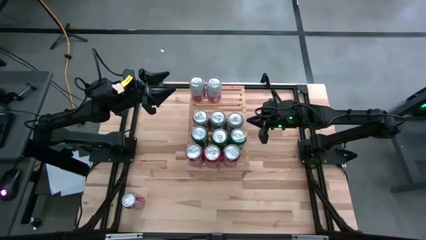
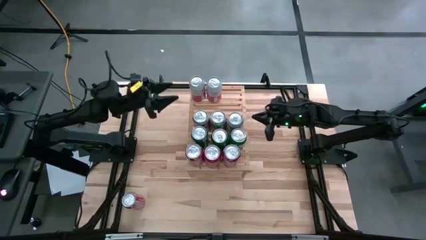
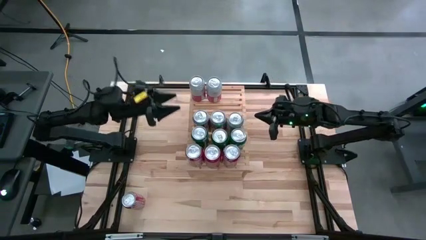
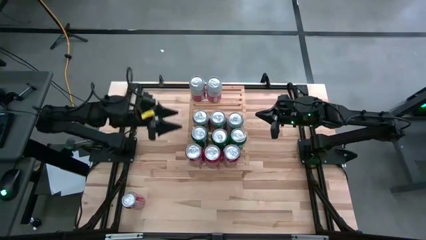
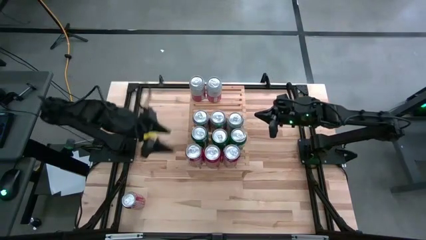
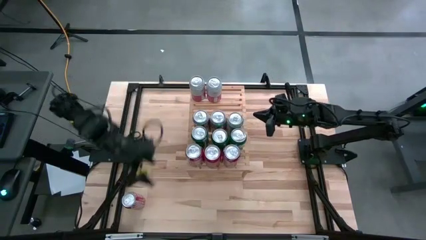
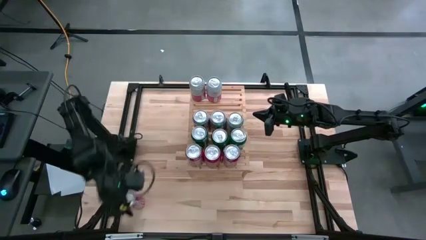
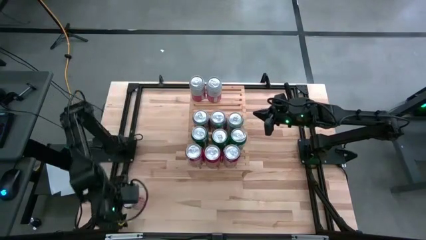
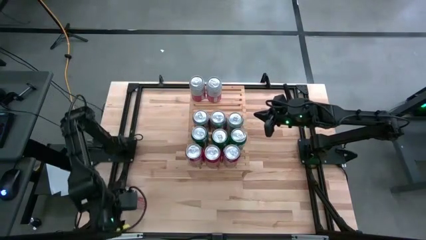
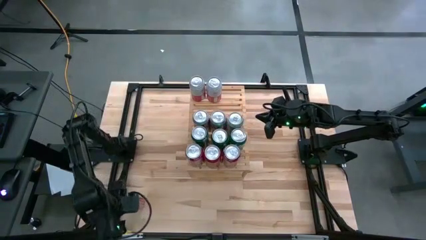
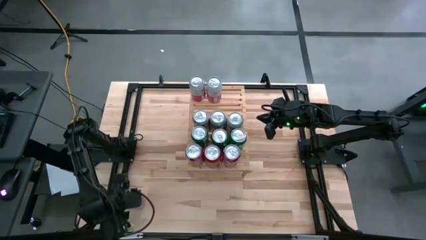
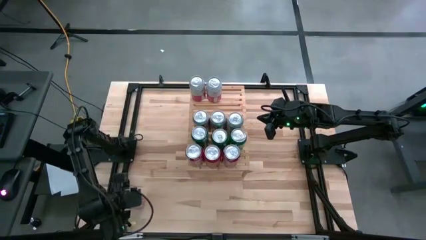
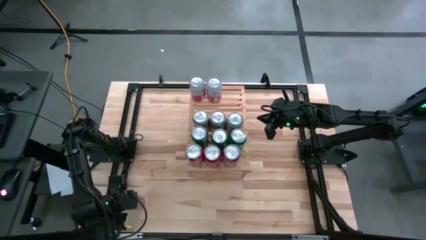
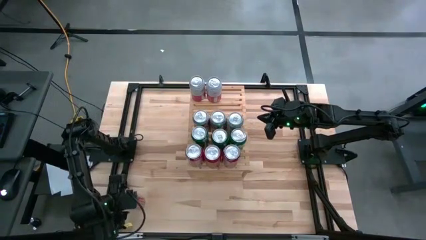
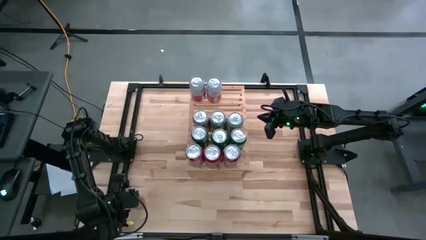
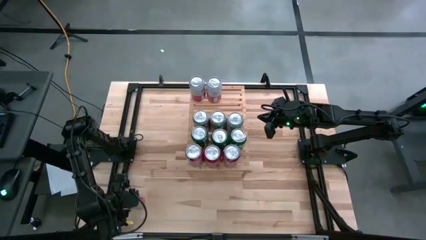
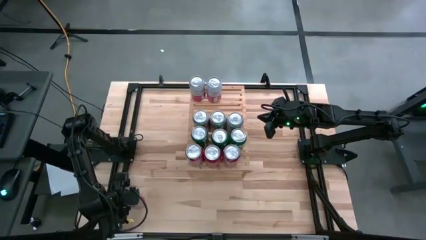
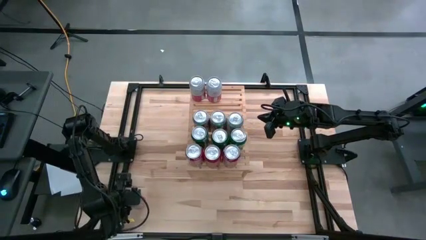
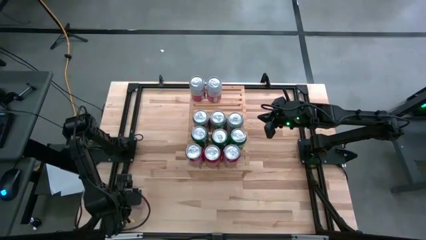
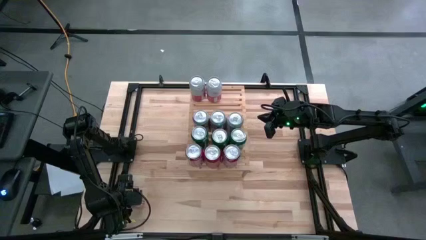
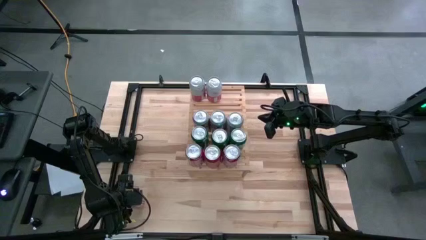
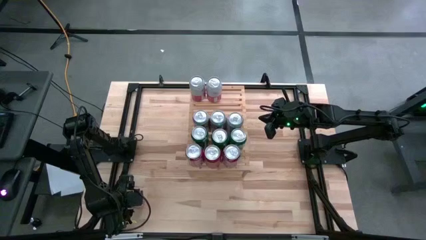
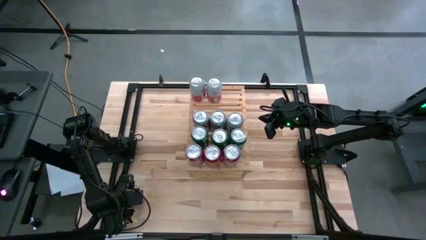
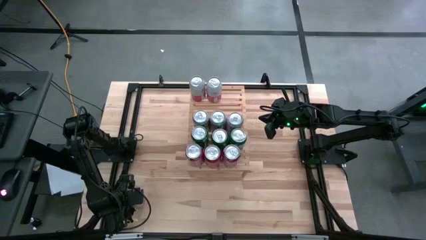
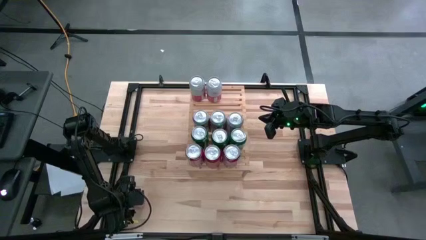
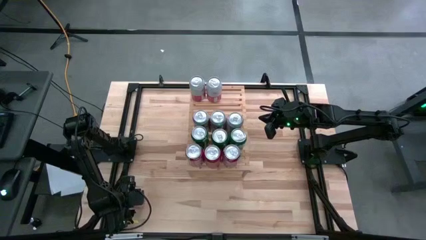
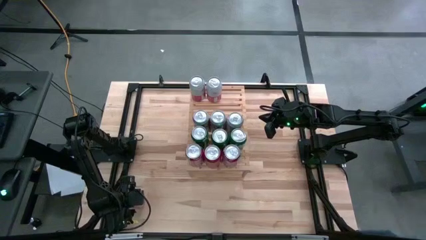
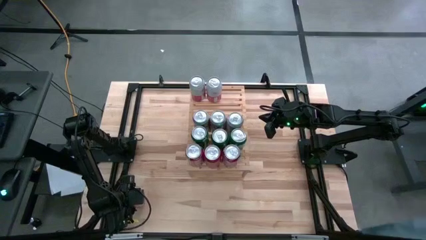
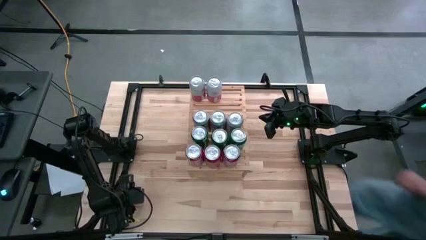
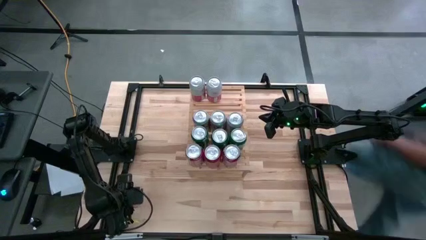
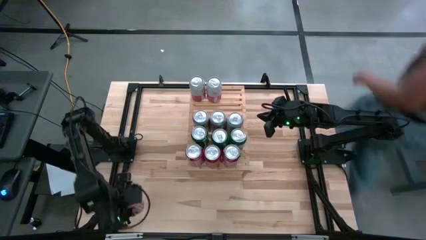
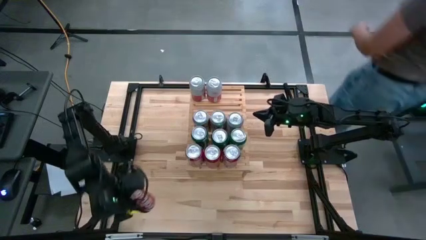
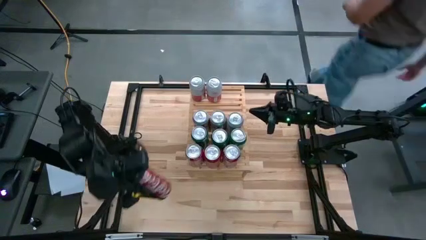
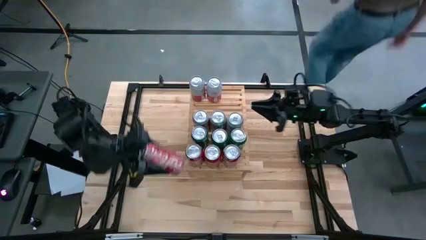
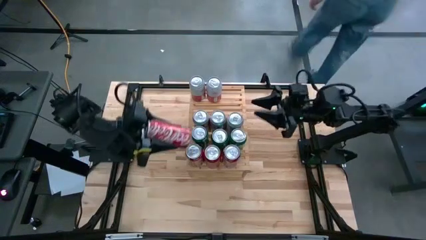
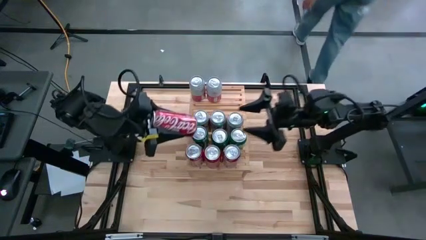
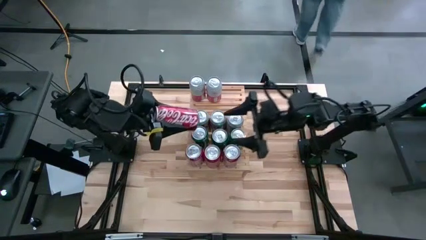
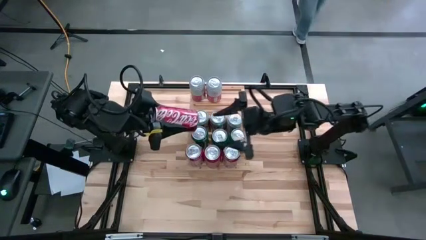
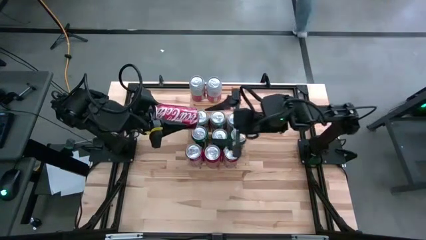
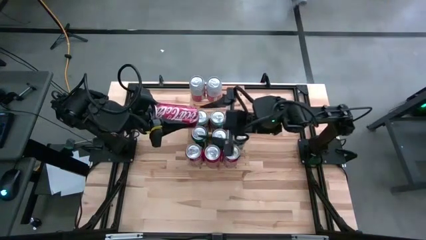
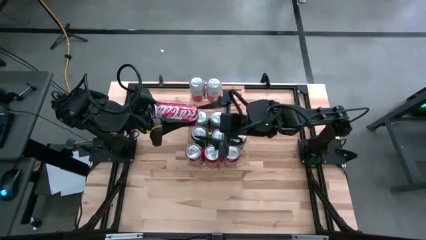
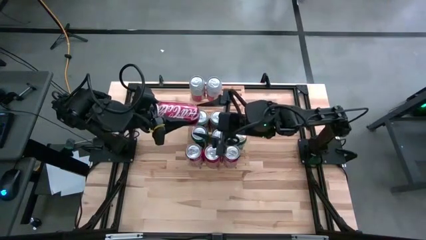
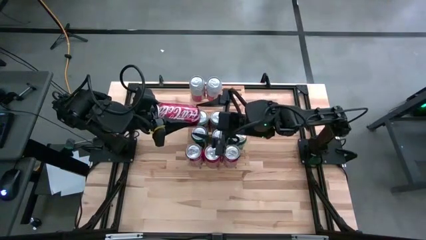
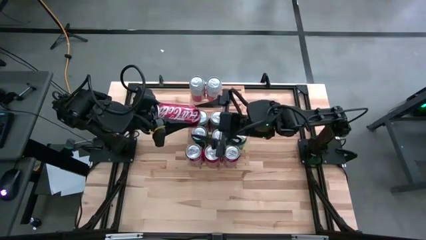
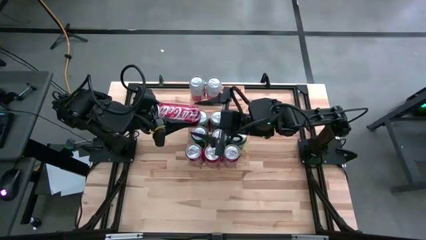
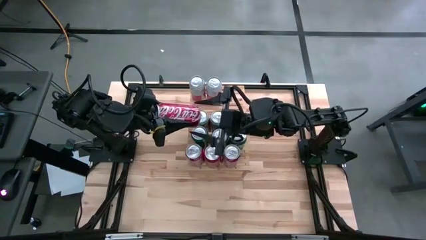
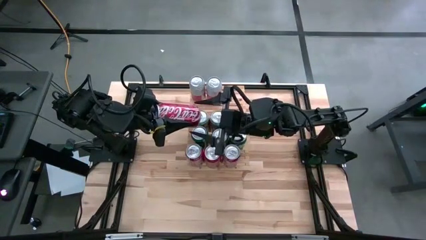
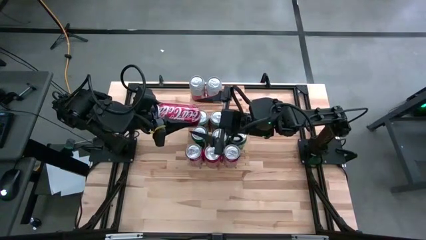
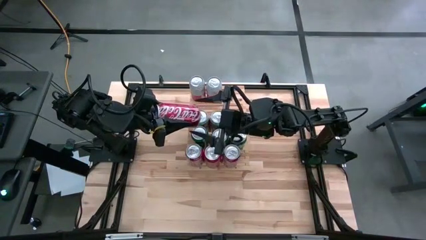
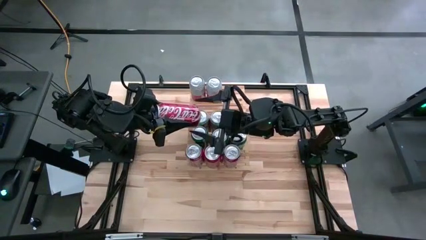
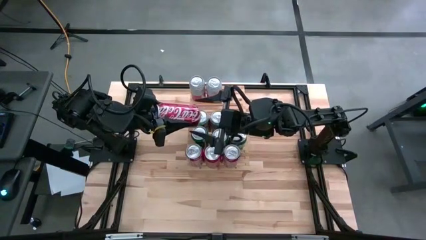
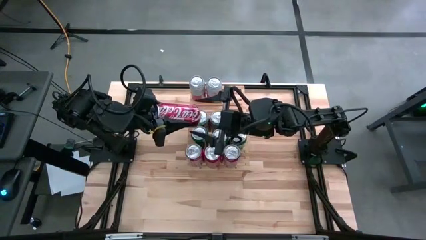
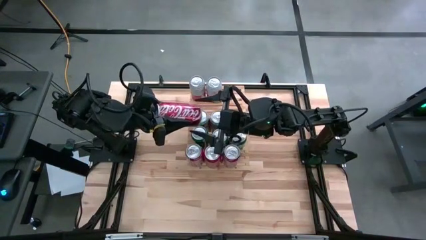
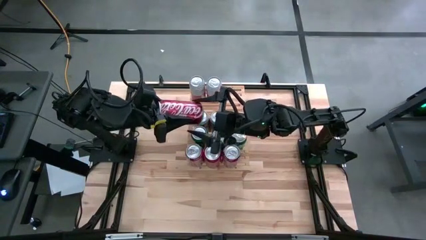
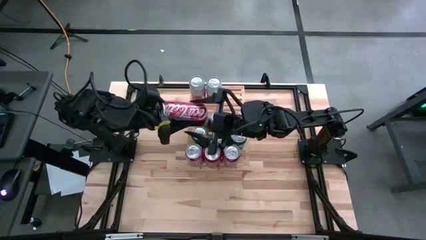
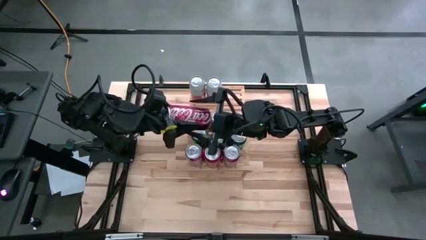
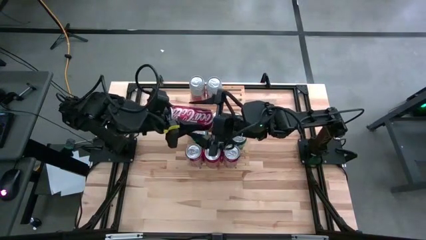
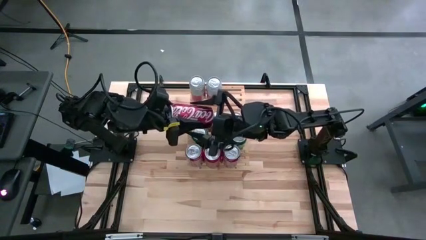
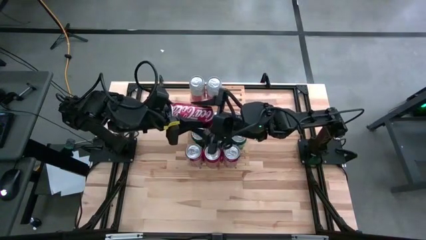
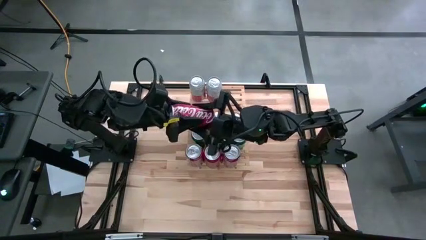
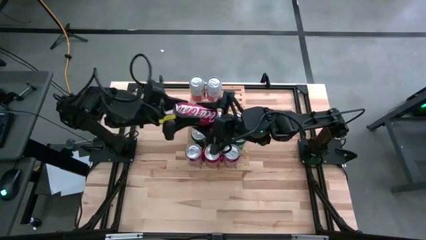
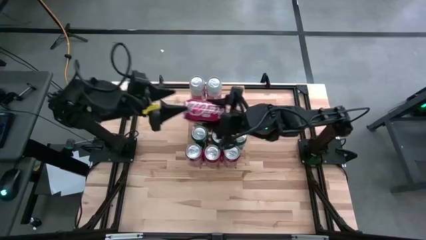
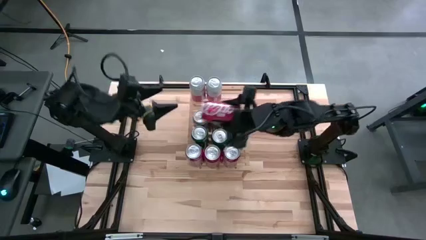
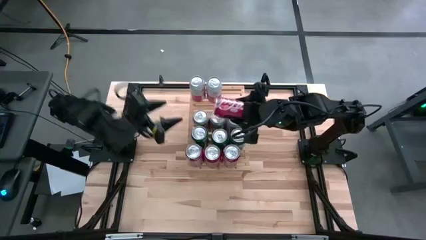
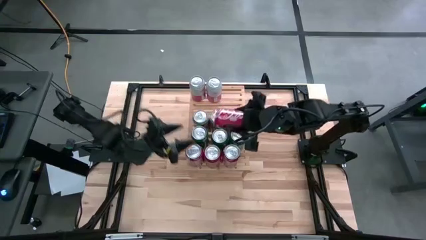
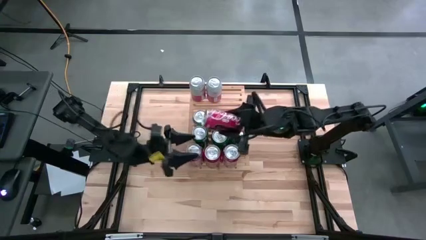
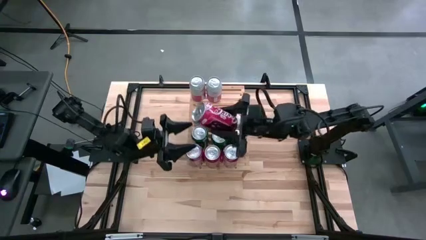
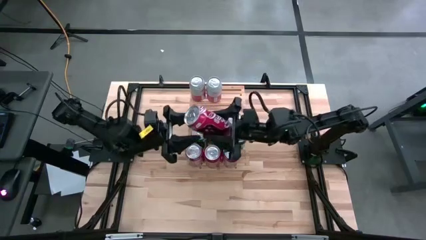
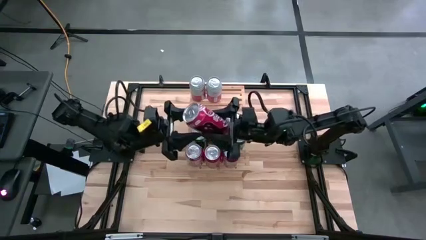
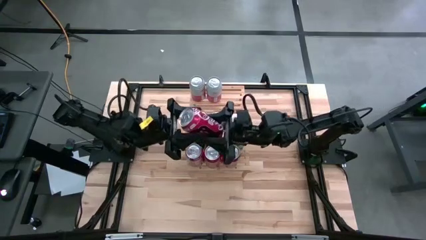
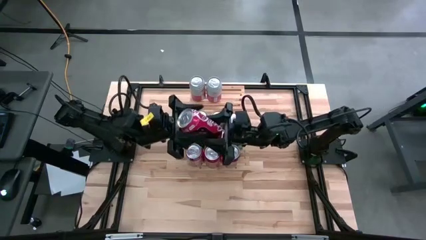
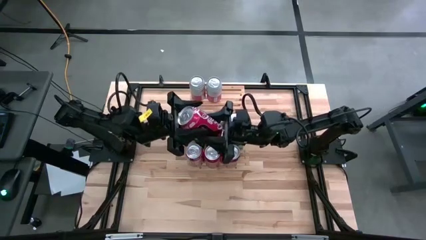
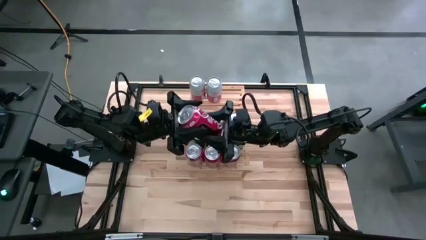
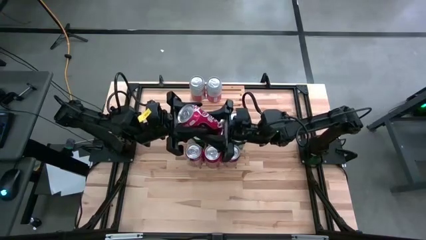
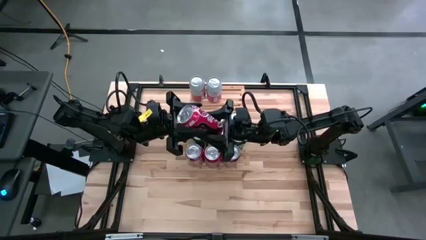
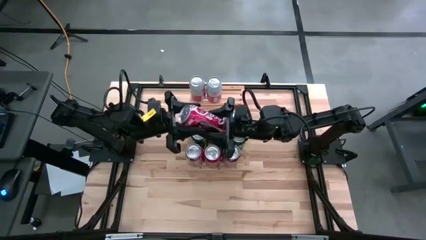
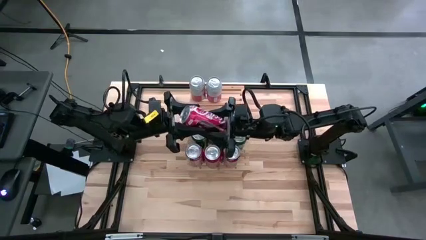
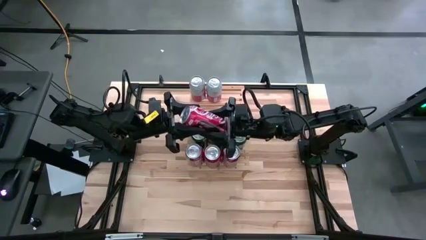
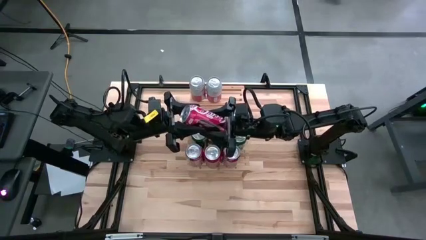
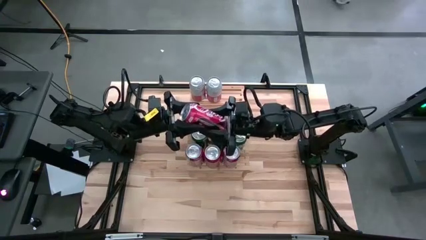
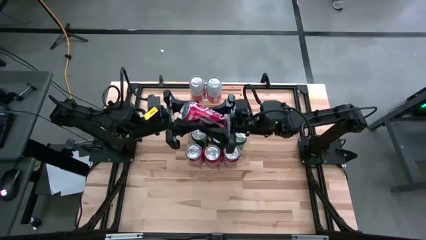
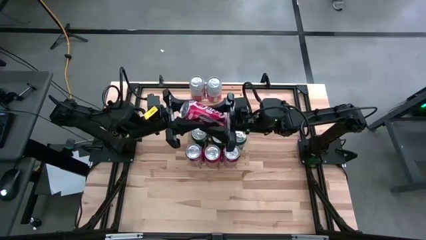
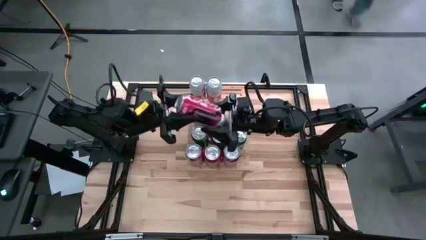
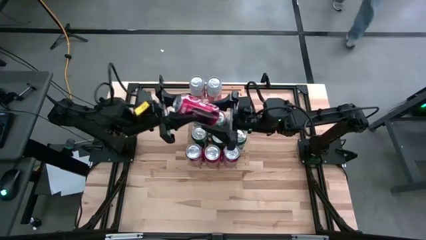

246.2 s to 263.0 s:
Task: Place canned beverage on shelf
Put the red soda can on the shelf aligned with the other red soda cans
